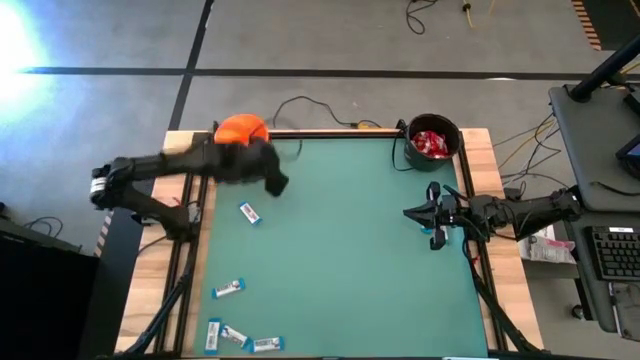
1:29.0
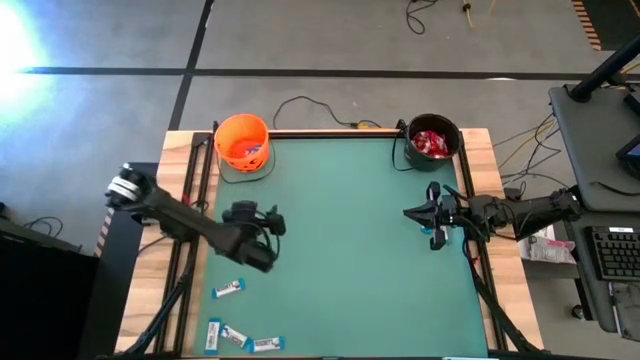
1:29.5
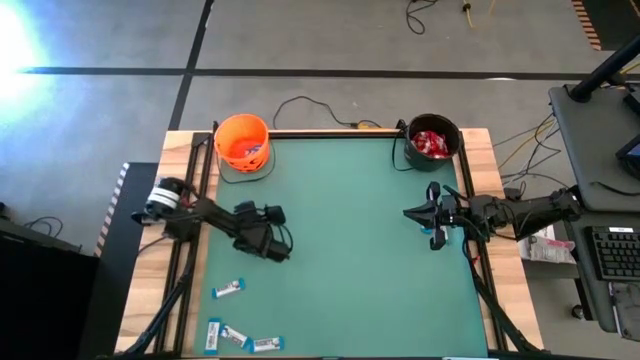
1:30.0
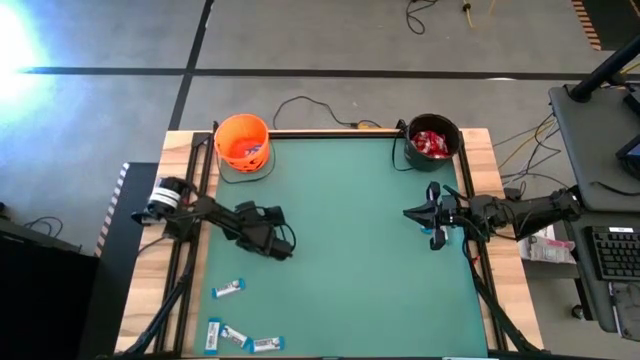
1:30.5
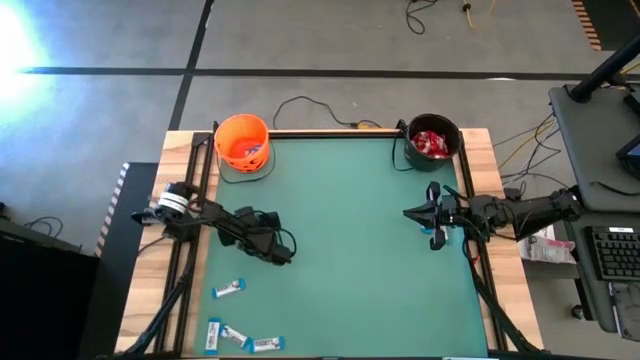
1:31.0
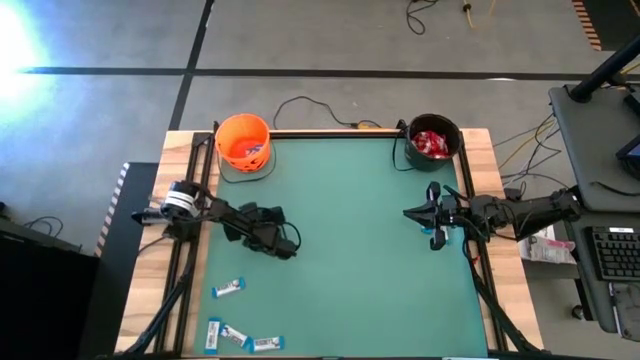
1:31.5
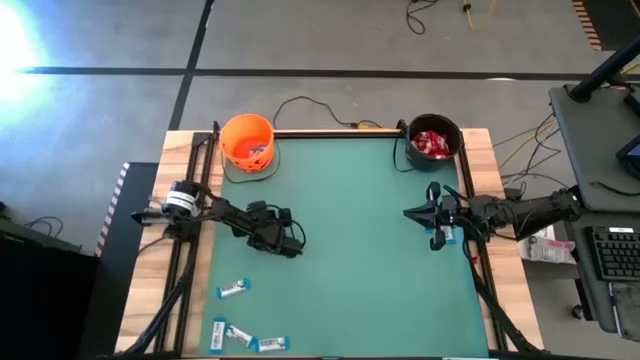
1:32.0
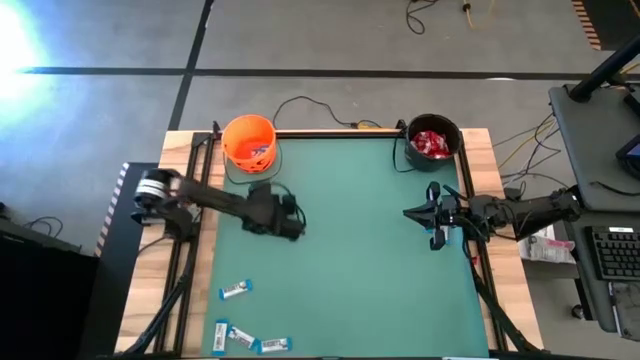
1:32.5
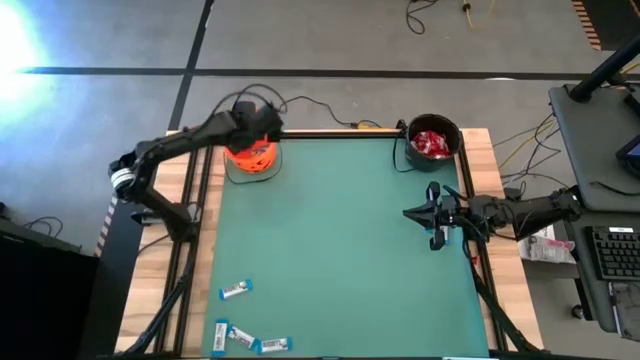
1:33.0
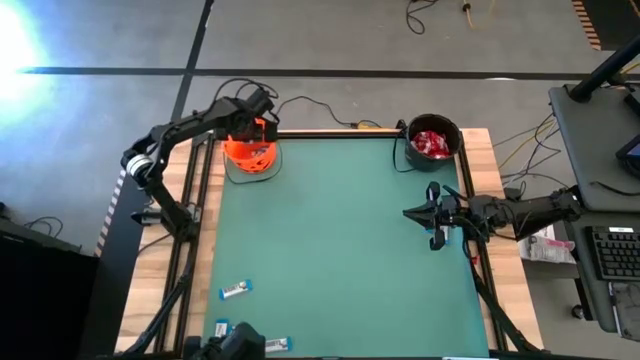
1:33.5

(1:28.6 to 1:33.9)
Task: Sort candy by brand, put in halloween buckets
Put the white chocolate into the orange bucket

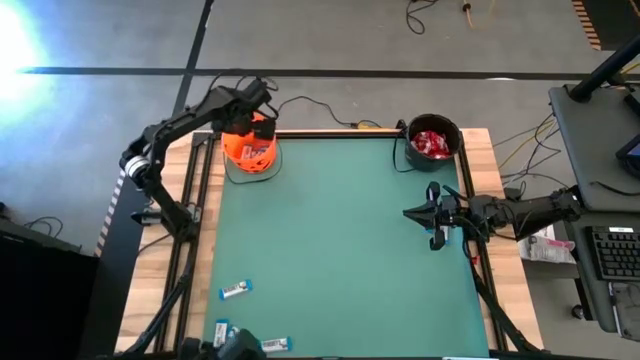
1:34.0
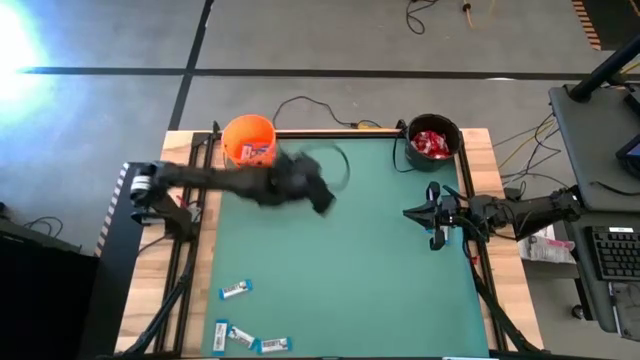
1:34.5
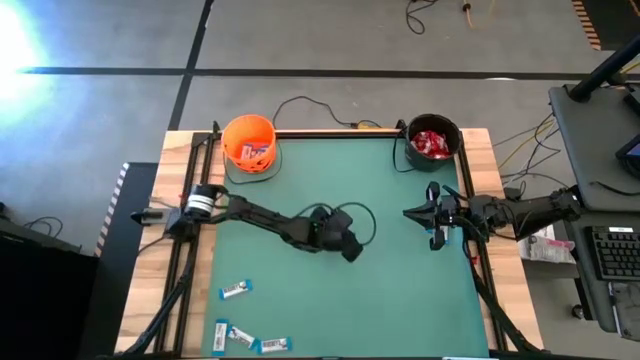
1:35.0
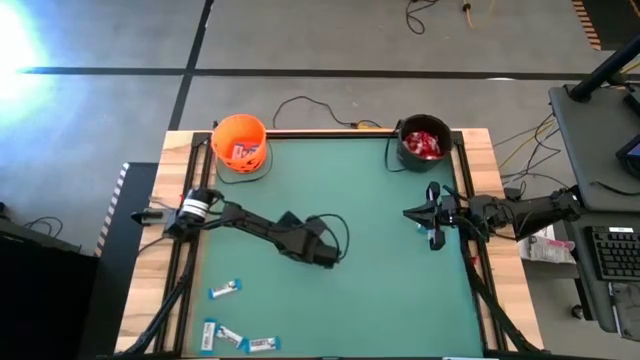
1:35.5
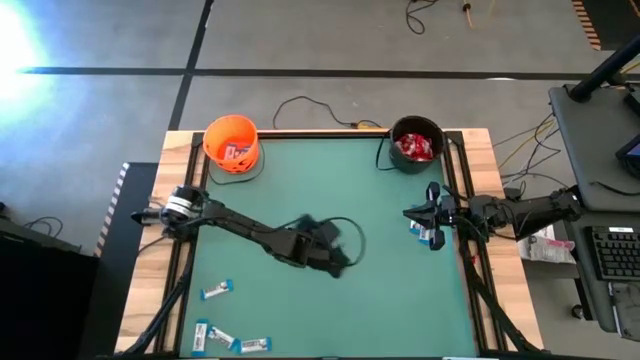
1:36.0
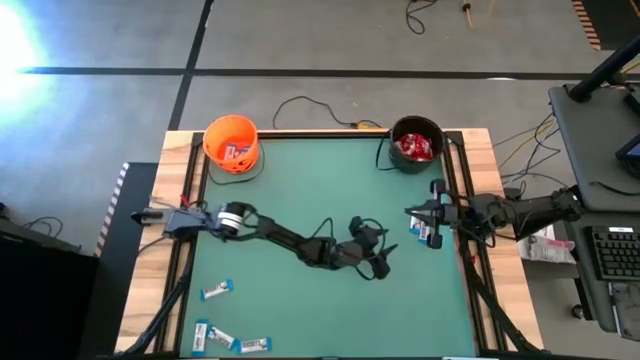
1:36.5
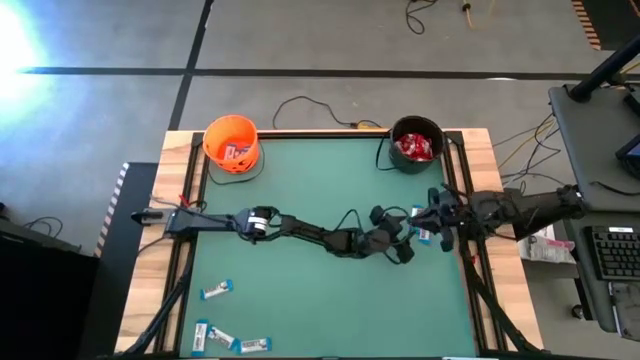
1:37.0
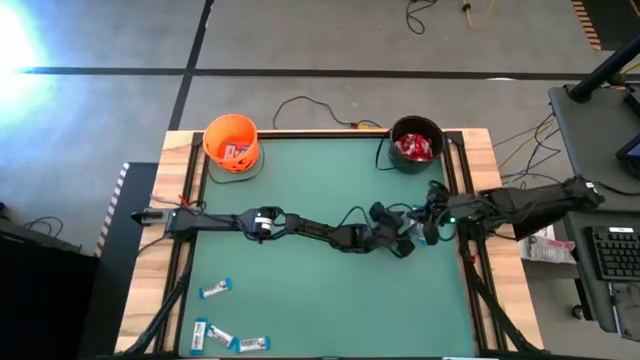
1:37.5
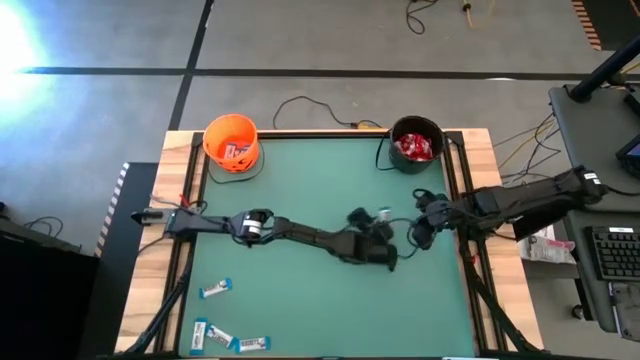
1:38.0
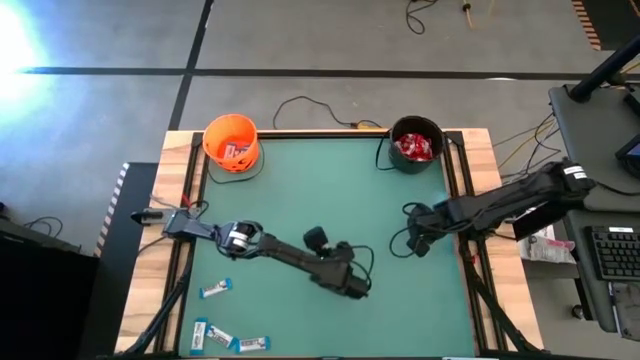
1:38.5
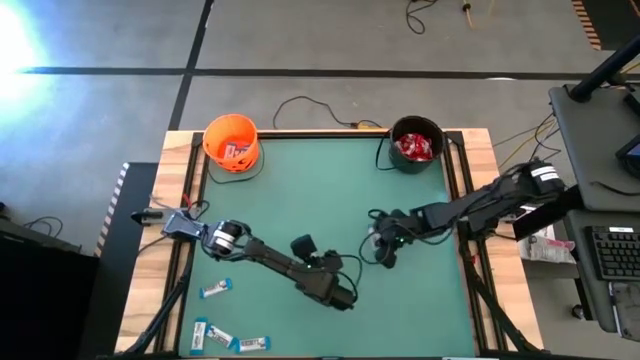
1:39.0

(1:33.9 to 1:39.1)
Move the white candies to the center of the table

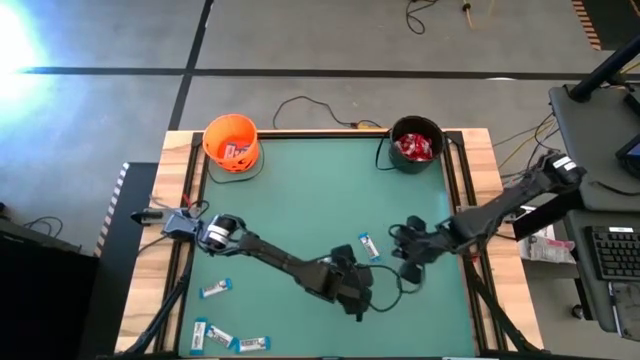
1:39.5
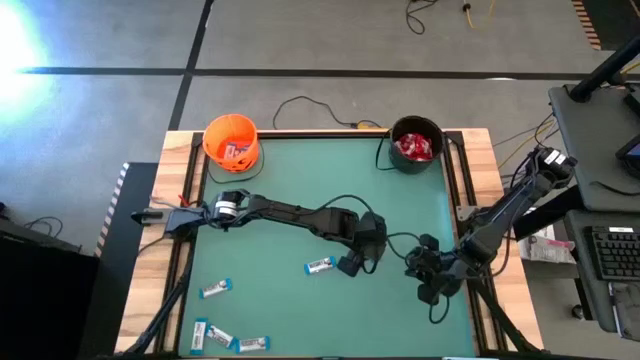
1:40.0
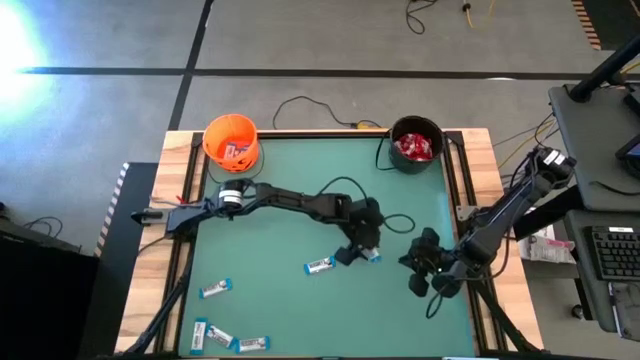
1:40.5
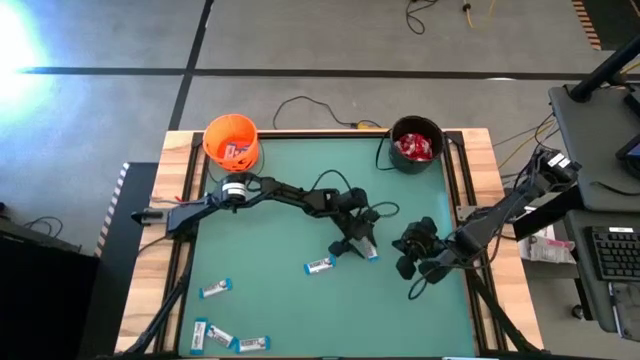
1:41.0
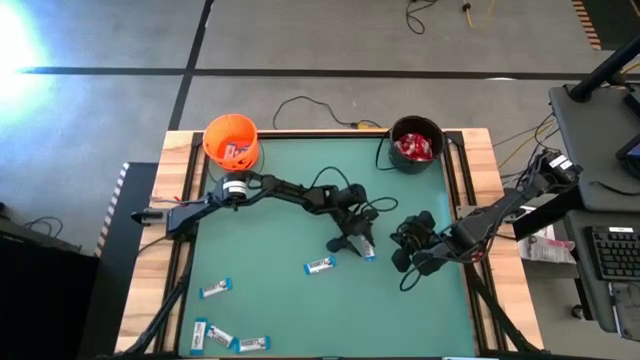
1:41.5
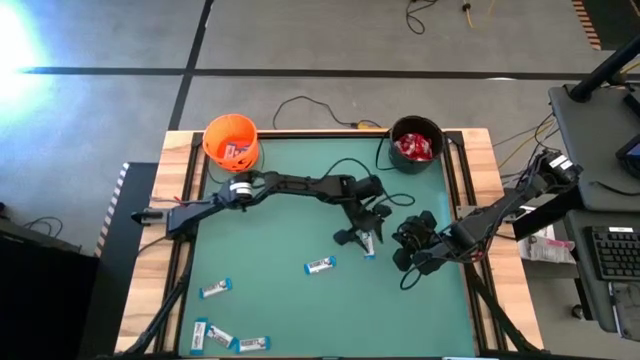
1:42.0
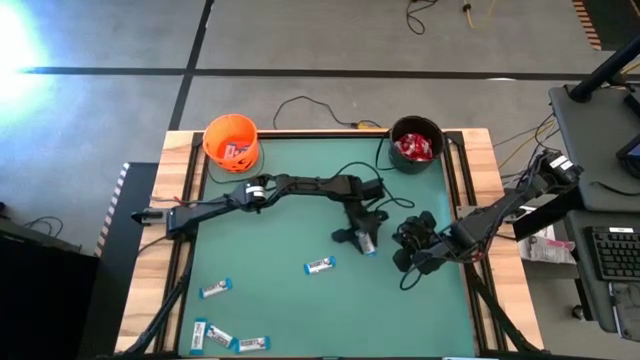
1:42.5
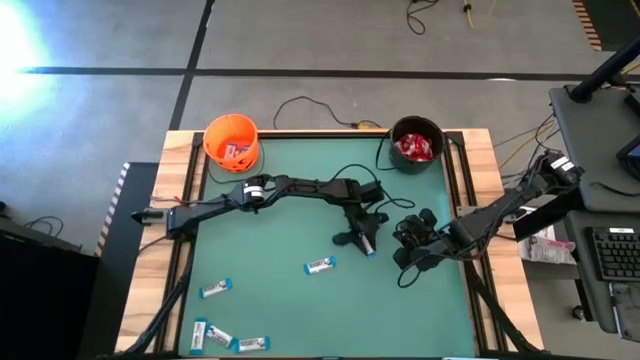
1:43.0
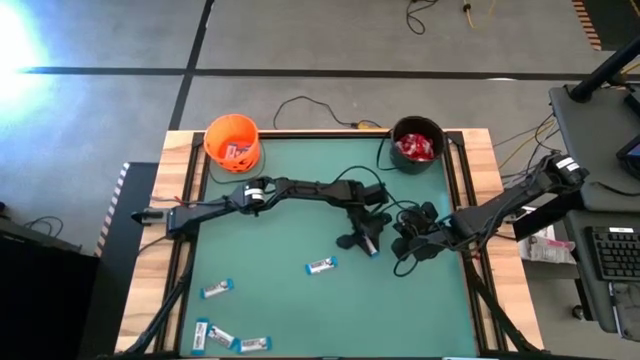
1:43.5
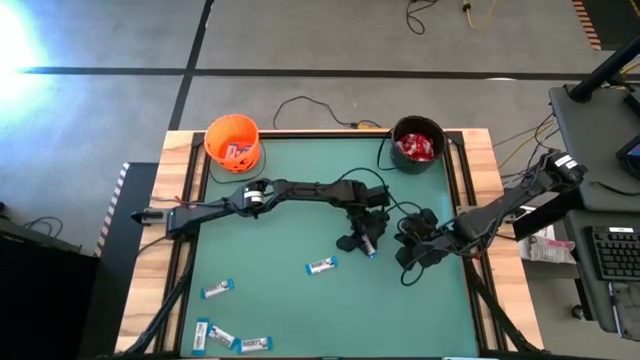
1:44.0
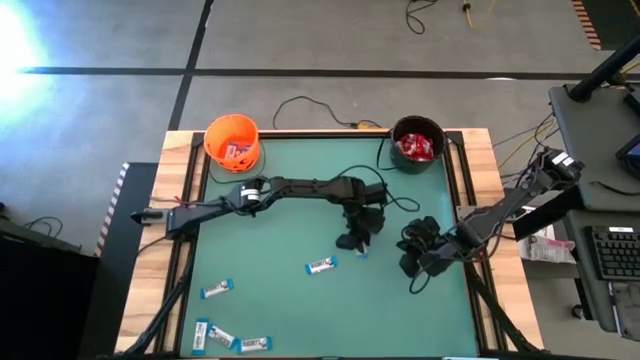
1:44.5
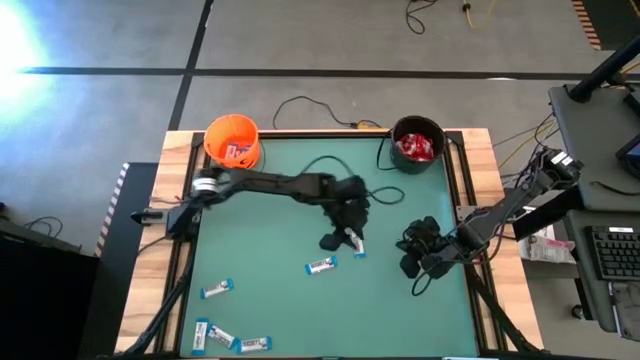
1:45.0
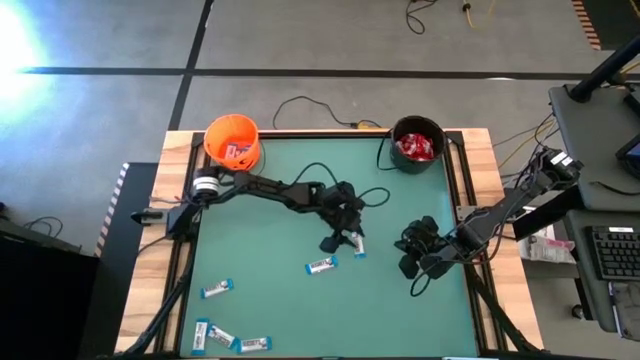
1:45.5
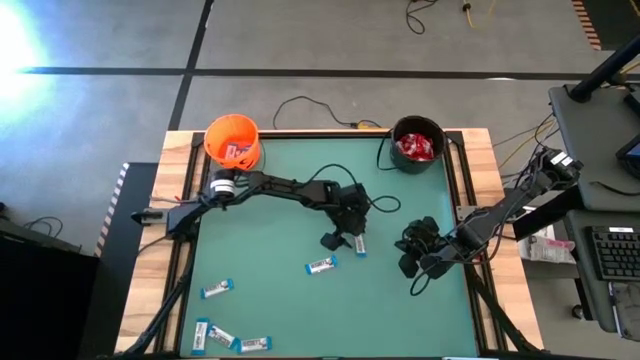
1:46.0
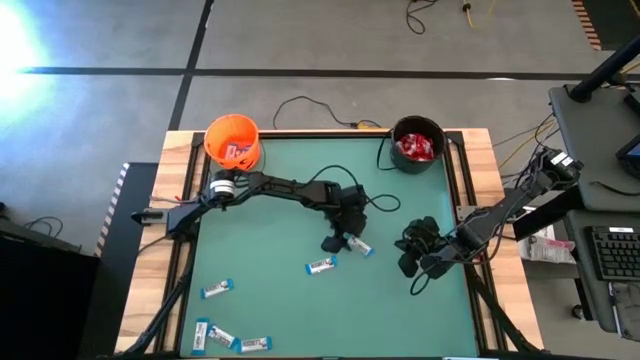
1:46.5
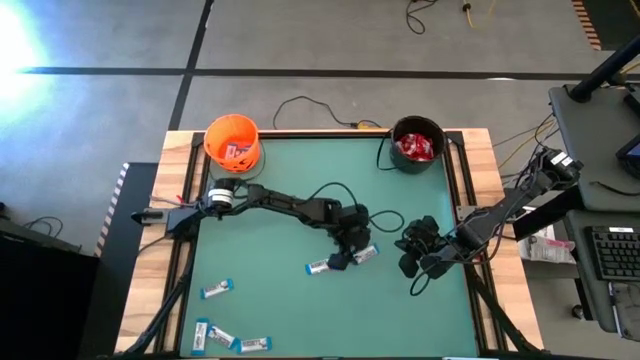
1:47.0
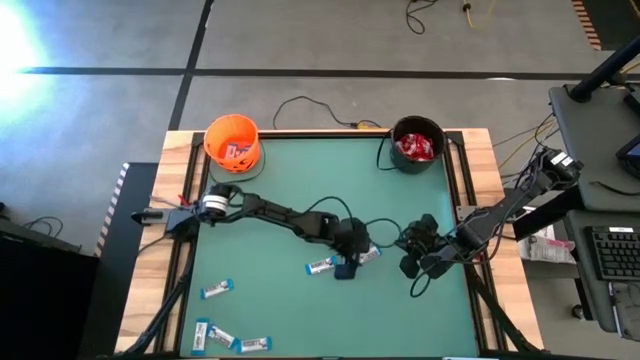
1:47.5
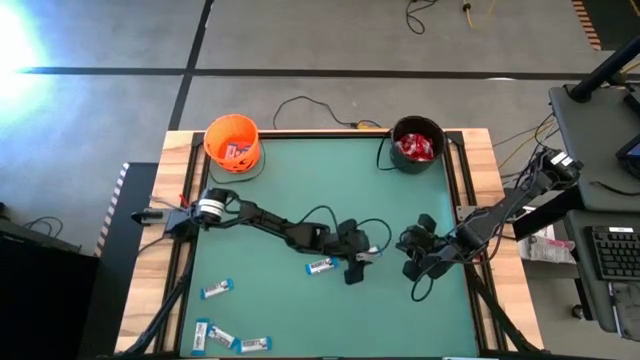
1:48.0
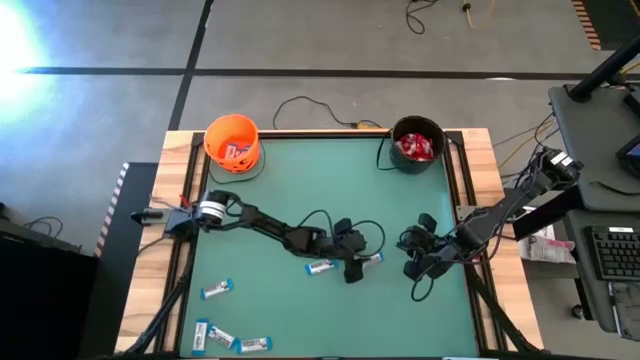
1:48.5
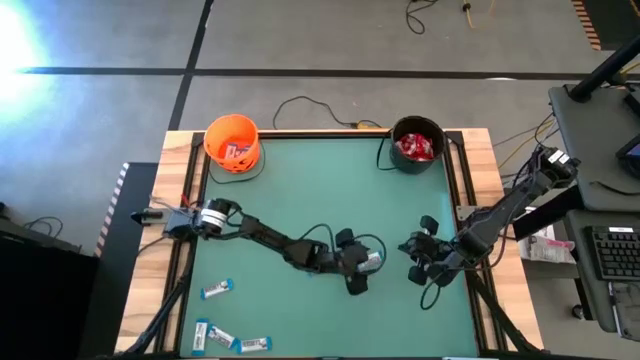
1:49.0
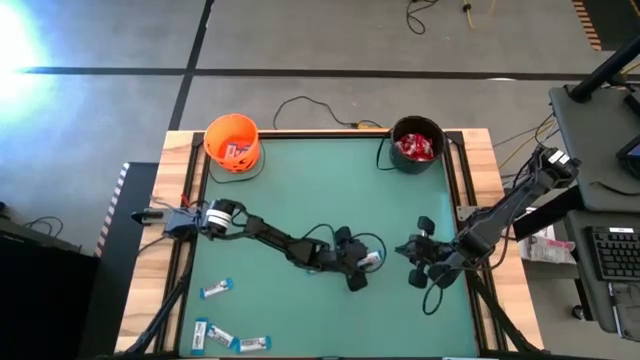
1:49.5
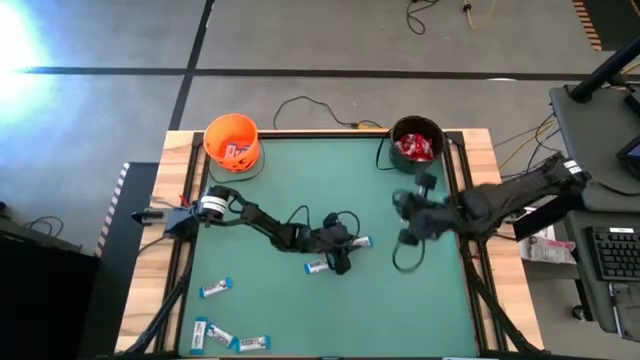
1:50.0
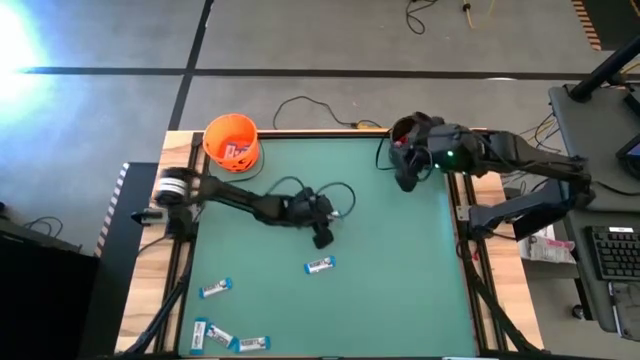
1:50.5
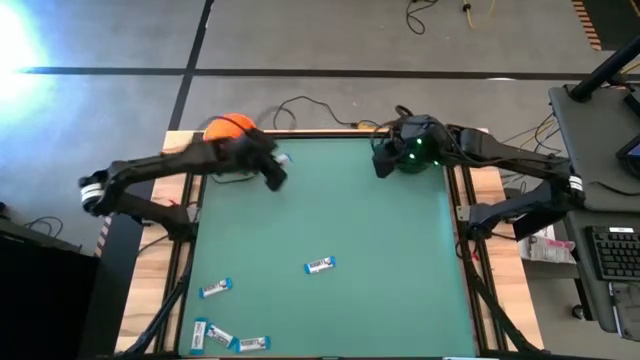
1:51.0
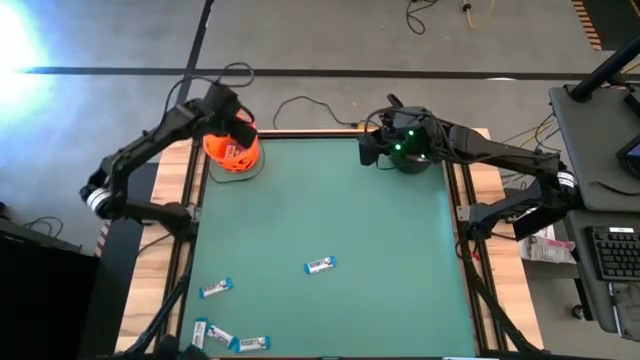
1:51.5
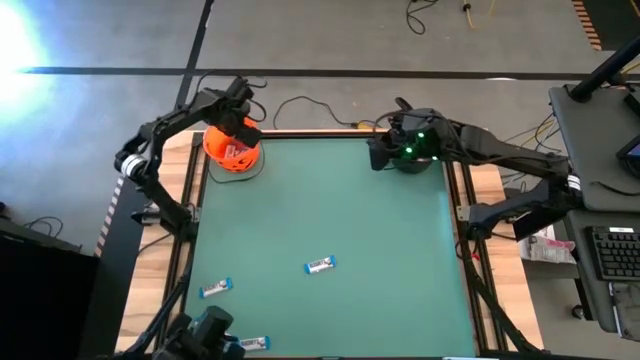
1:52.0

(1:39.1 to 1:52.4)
Put the white chocolate into the orange bucket
